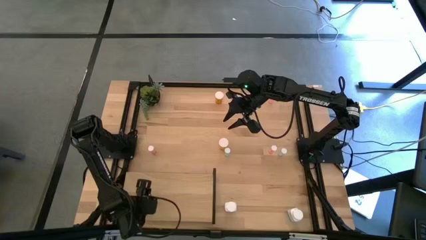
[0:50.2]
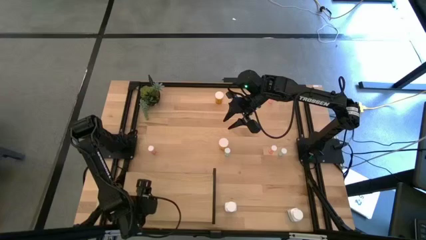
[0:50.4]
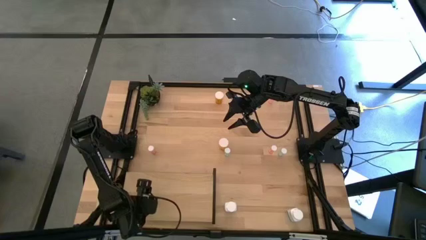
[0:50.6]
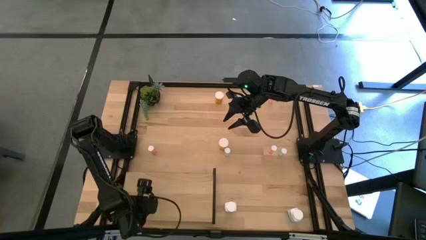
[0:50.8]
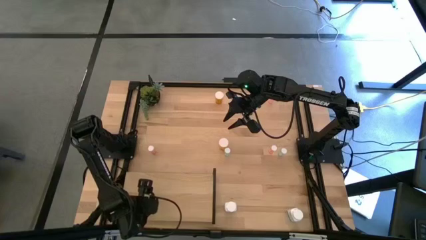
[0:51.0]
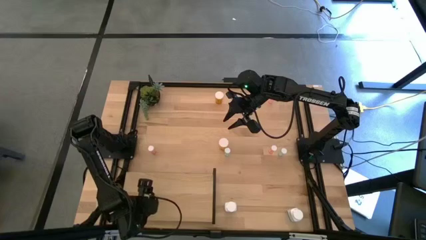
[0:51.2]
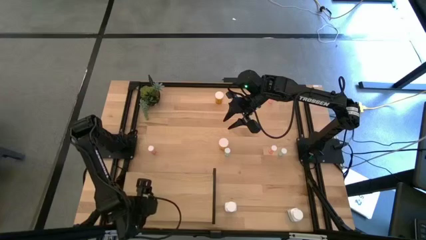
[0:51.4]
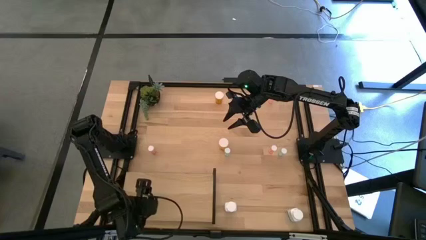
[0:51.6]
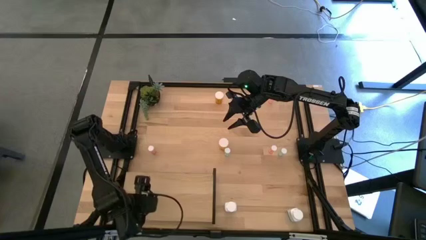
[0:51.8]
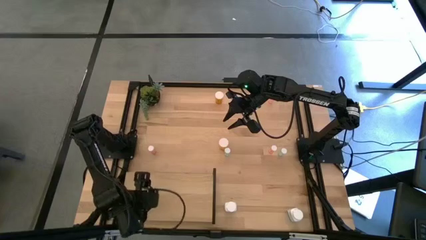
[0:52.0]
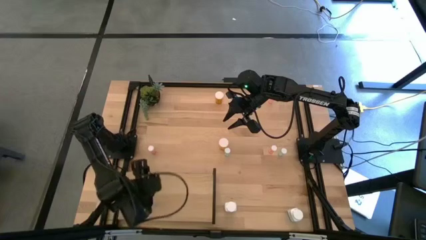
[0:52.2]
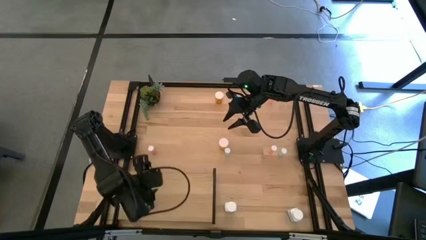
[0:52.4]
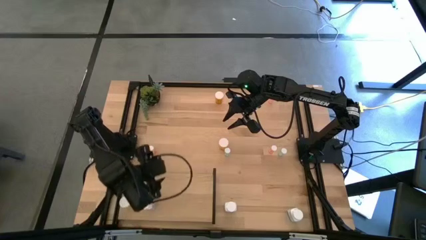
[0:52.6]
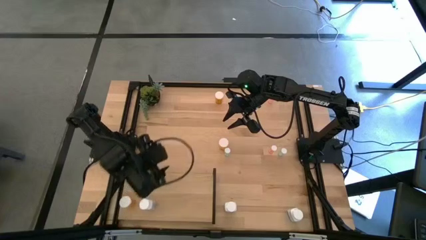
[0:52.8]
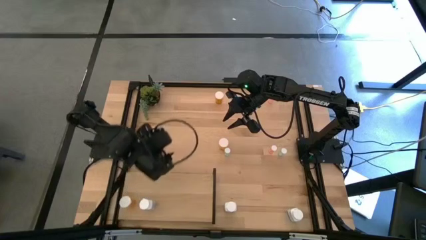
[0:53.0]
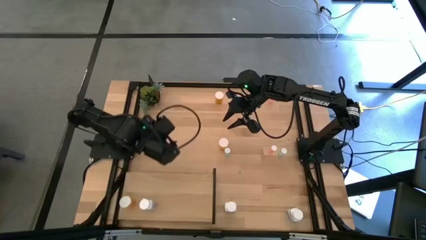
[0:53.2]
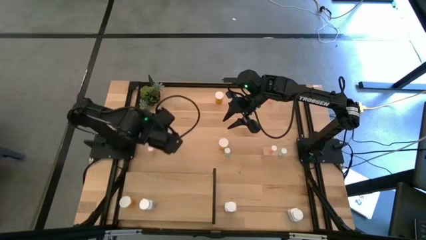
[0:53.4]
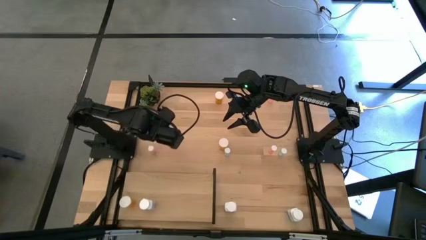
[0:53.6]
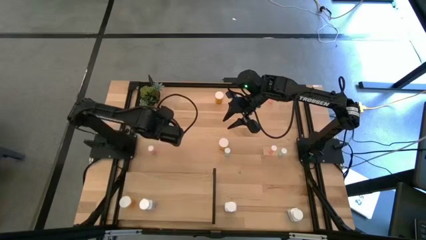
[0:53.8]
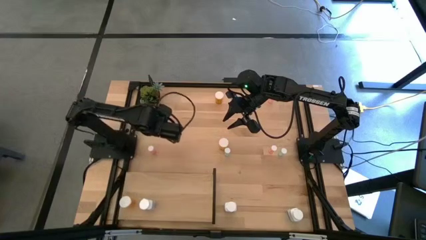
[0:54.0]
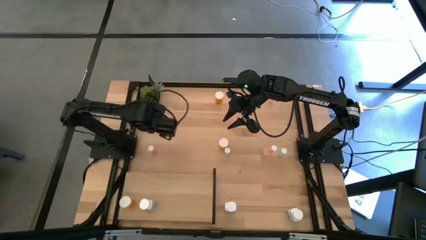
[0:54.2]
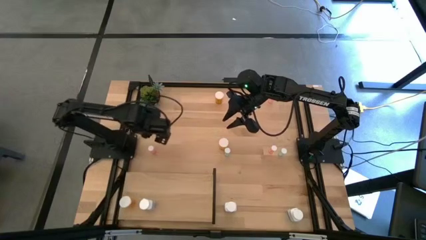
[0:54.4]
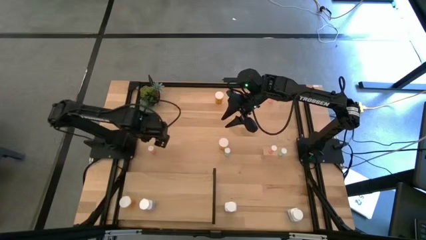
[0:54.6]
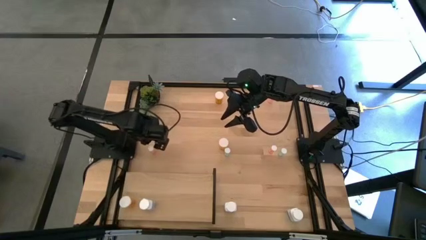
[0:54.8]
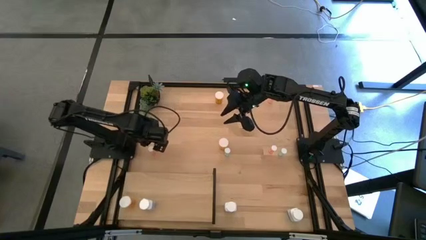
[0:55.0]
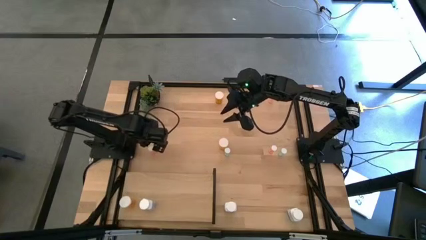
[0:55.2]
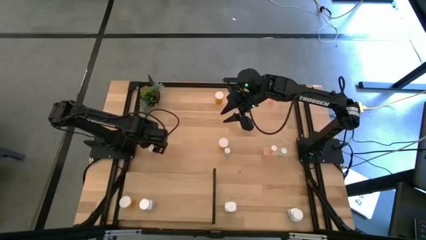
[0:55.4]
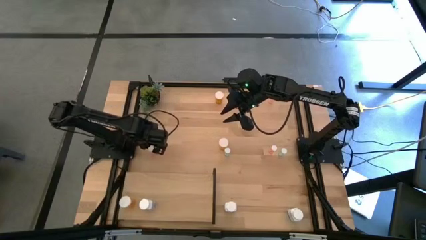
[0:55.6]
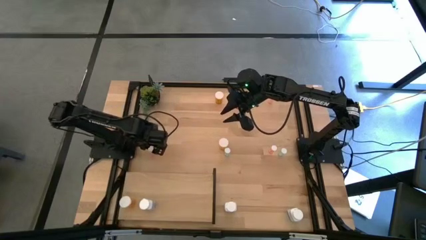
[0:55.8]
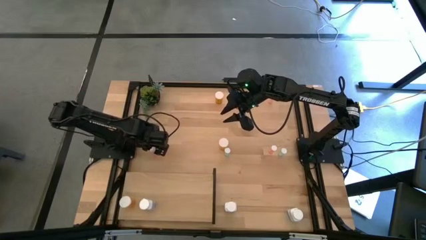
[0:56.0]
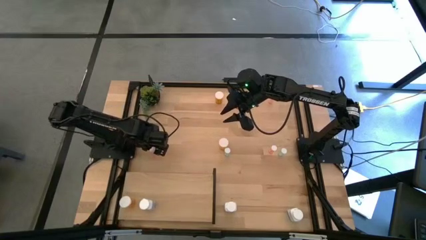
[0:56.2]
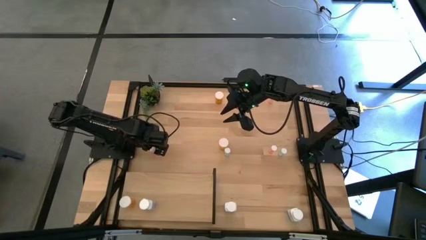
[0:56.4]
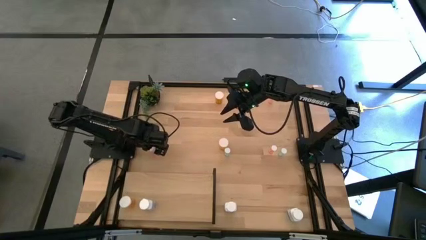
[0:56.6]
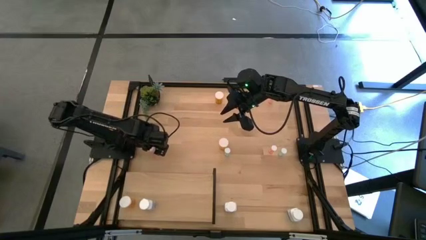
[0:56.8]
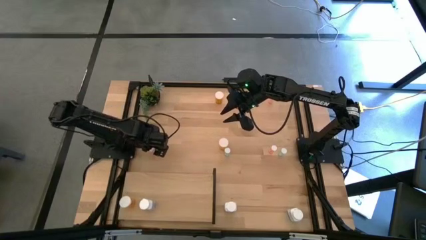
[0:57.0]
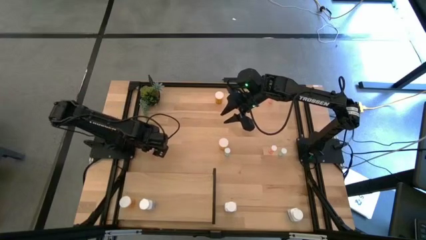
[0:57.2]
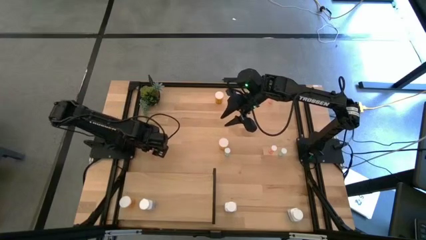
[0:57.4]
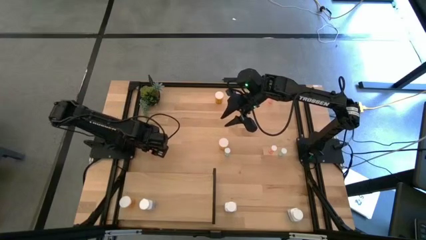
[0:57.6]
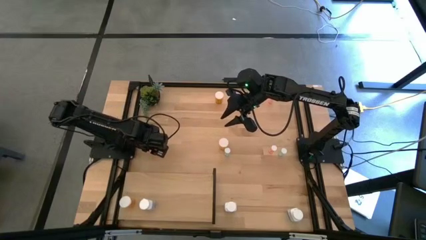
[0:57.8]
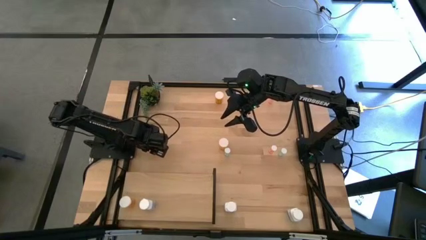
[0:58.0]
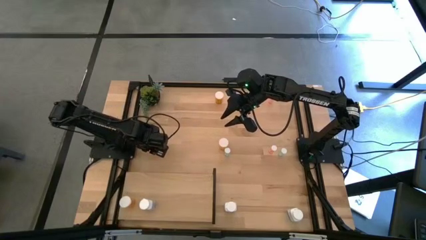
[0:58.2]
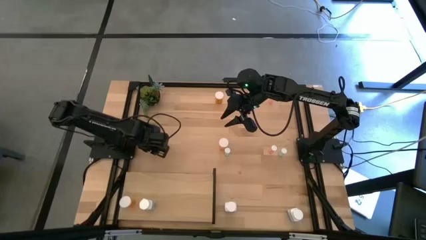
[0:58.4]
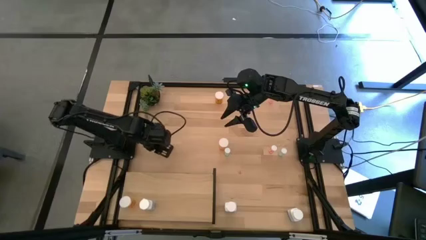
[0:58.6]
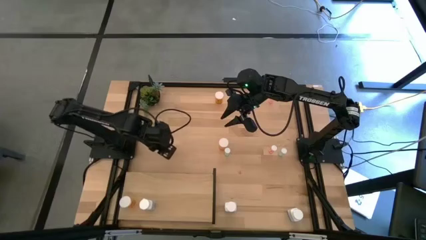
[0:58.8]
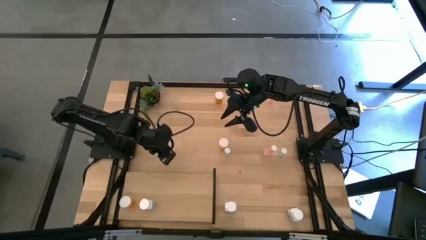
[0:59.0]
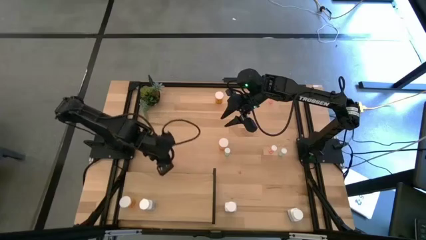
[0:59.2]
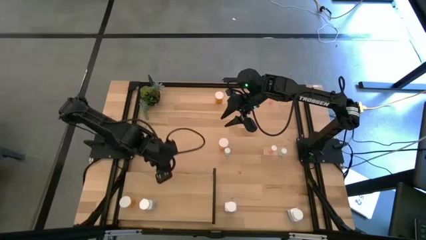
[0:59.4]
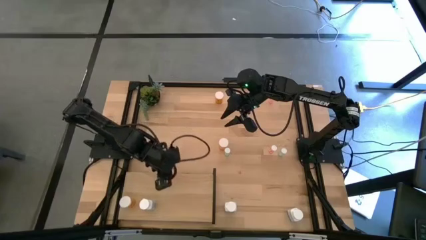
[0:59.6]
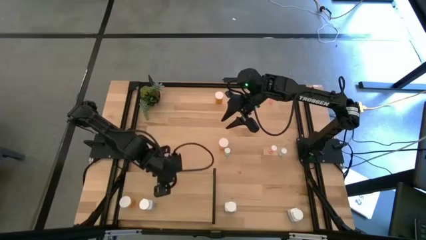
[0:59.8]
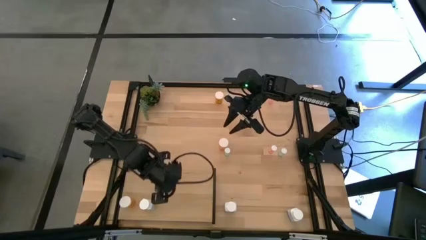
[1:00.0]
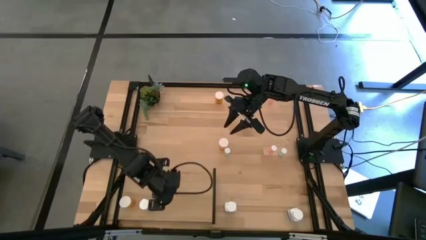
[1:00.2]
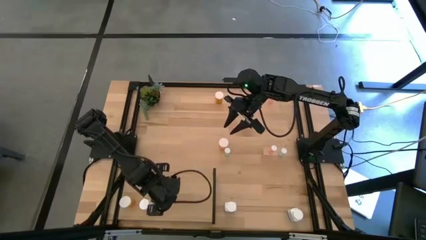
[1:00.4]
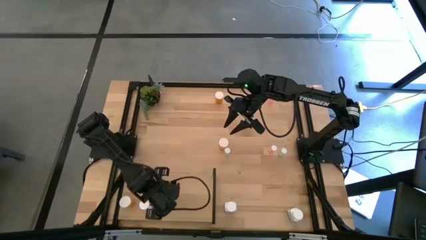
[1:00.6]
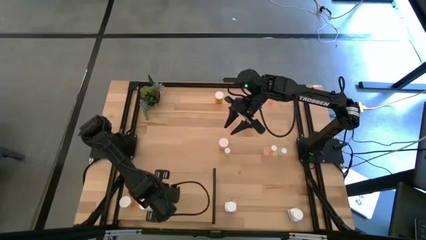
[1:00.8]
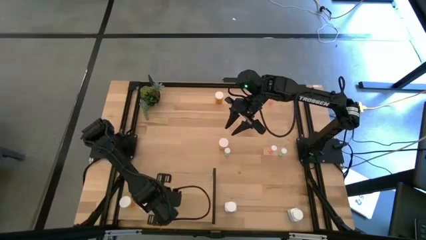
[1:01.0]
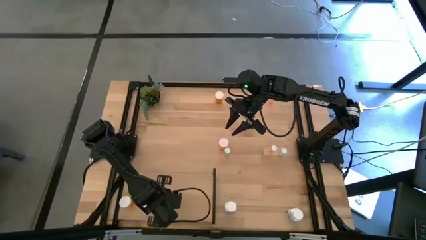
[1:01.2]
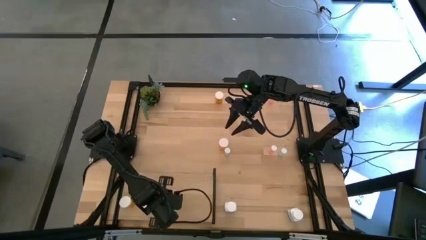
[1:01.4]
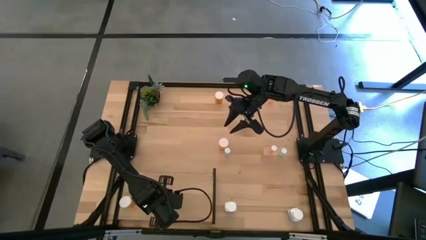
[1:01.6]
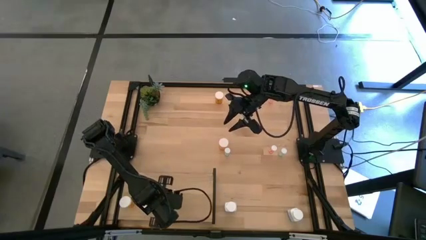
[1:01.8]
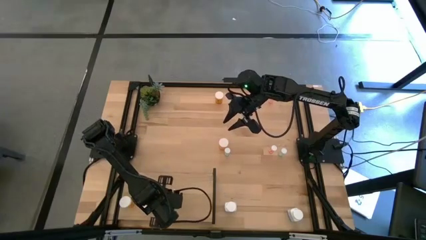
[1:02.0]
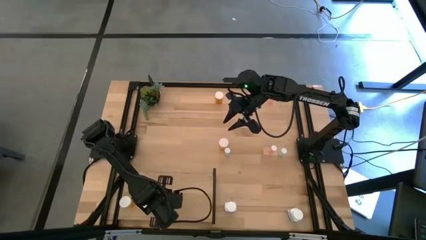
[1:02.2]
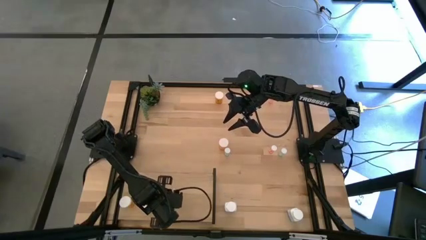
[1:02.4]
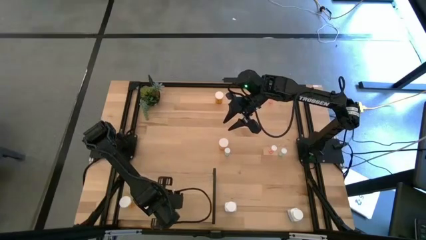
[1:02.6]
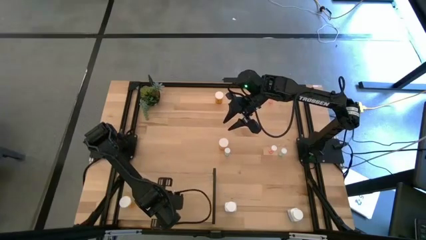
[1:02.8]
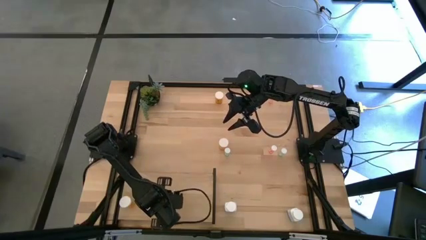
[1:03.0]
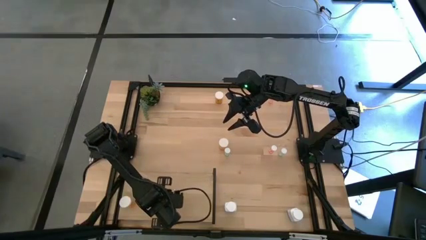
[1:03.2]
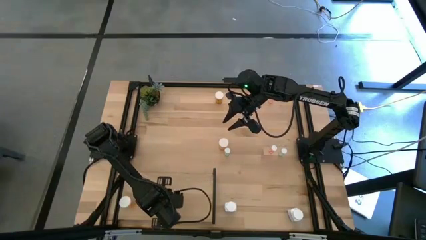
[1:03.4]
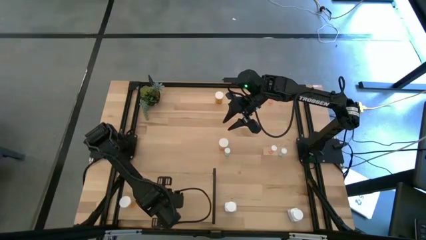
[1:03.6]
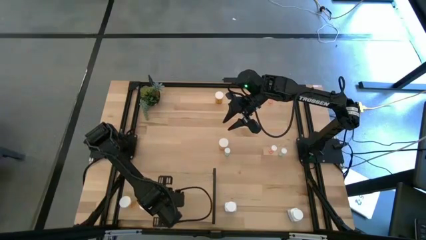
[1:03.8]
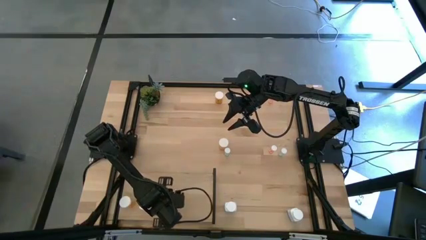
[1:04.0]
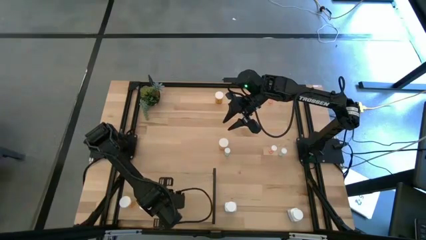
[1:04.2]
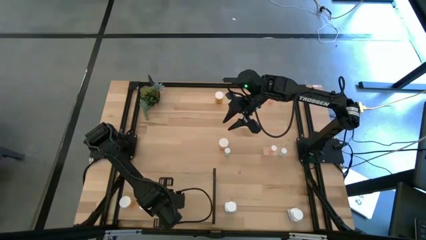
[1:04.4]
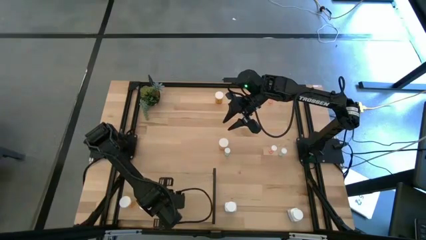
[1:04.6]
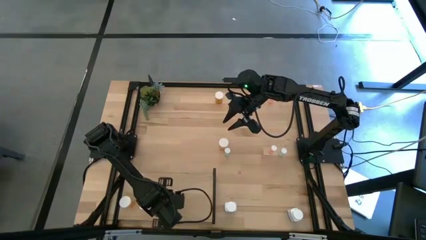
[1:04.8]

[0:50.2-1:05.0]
Task: Pick and place medicine bottles onto shelf by color
Put the bottom left small red pill bottle on the shelf
